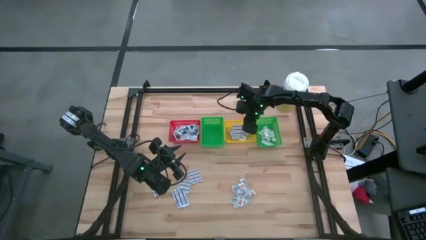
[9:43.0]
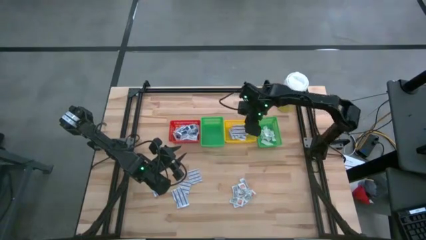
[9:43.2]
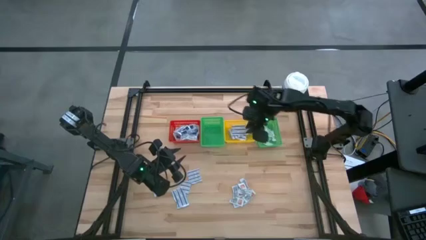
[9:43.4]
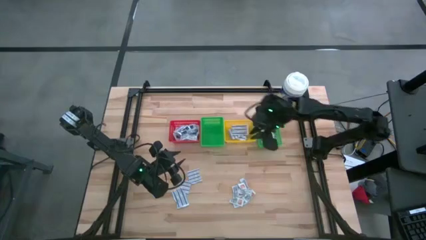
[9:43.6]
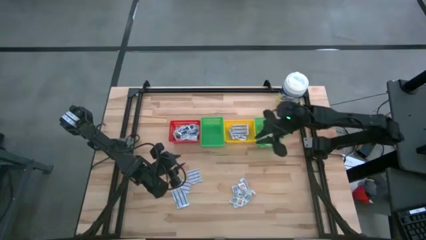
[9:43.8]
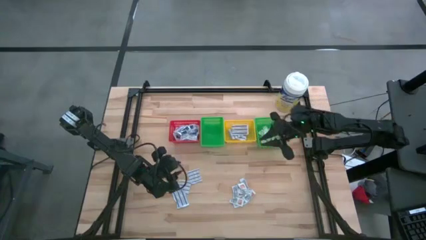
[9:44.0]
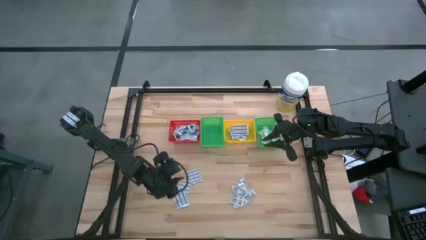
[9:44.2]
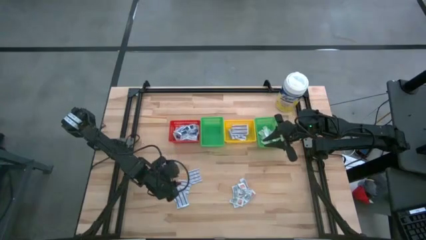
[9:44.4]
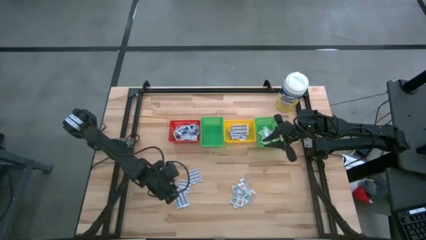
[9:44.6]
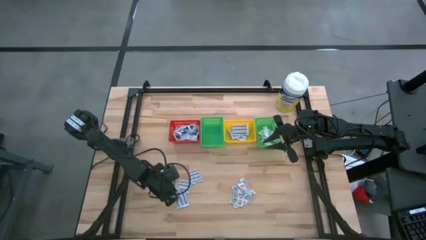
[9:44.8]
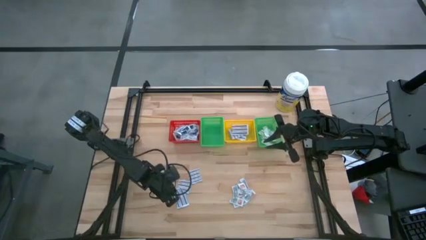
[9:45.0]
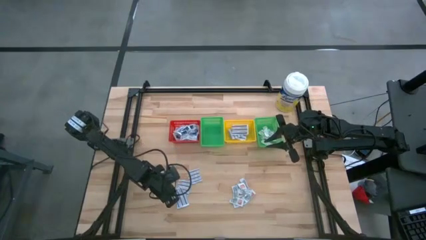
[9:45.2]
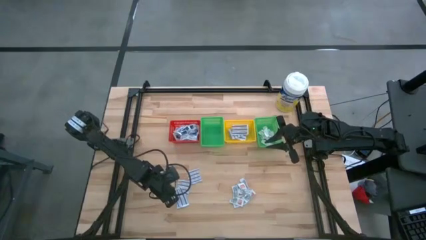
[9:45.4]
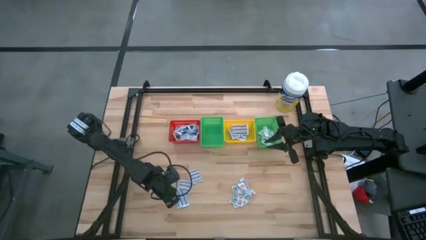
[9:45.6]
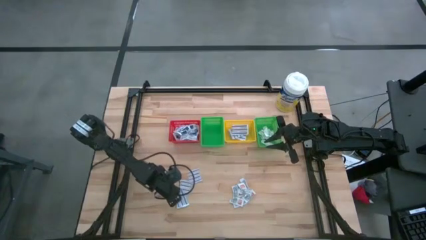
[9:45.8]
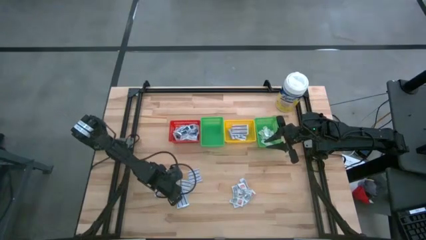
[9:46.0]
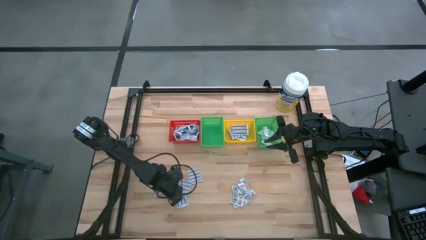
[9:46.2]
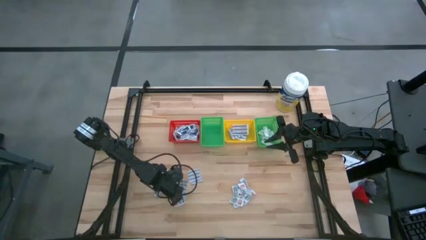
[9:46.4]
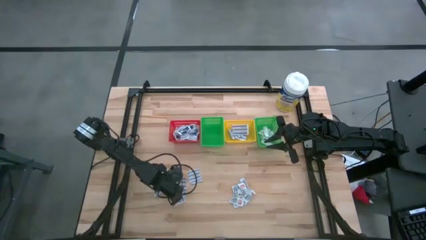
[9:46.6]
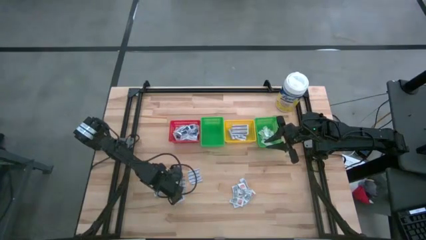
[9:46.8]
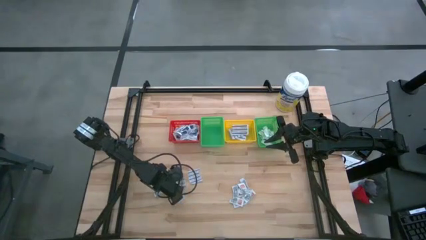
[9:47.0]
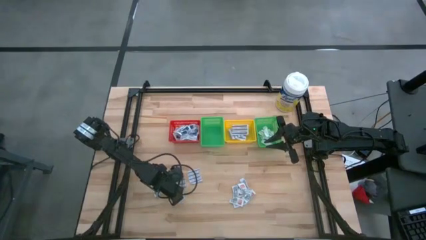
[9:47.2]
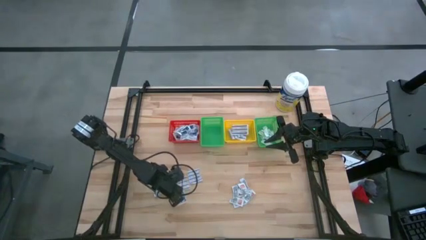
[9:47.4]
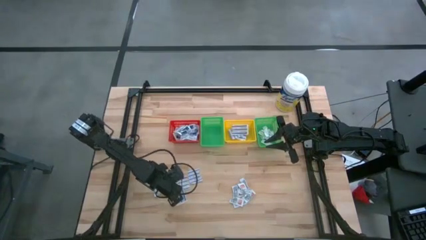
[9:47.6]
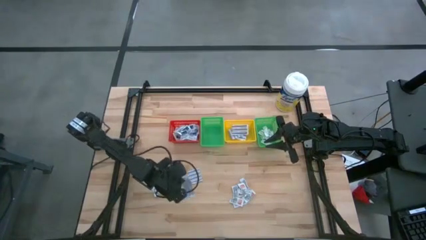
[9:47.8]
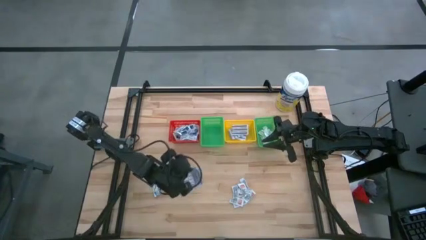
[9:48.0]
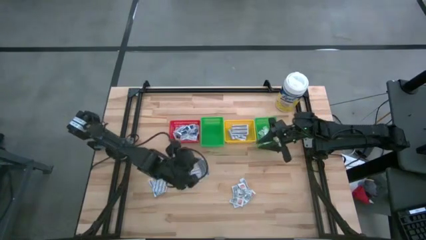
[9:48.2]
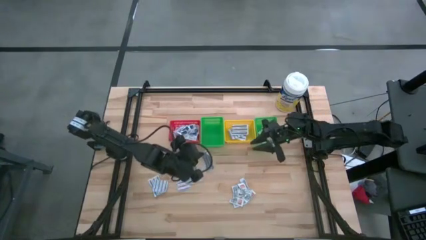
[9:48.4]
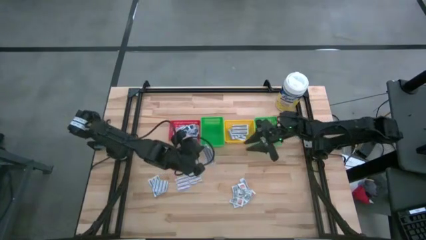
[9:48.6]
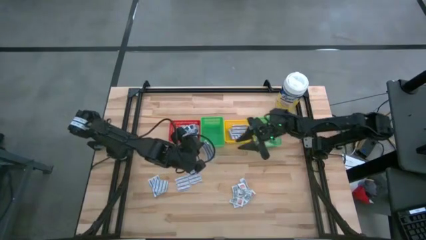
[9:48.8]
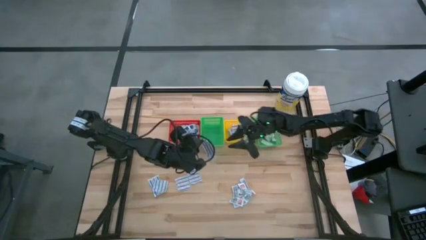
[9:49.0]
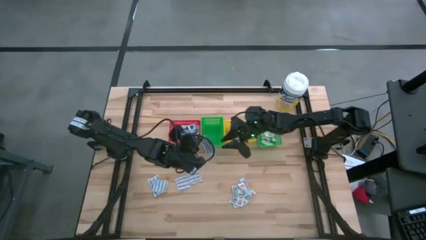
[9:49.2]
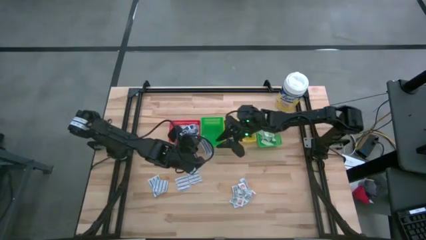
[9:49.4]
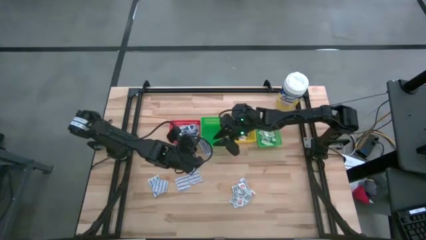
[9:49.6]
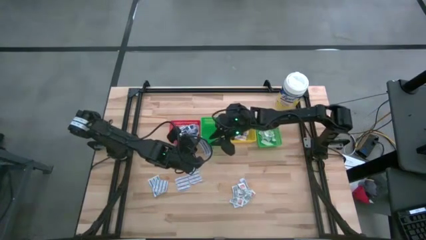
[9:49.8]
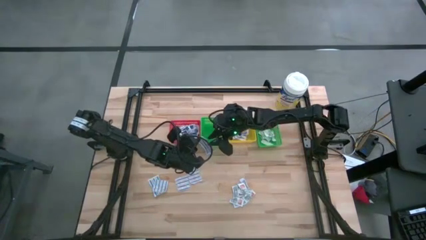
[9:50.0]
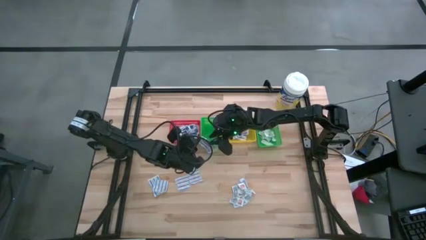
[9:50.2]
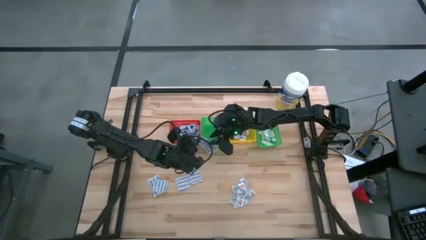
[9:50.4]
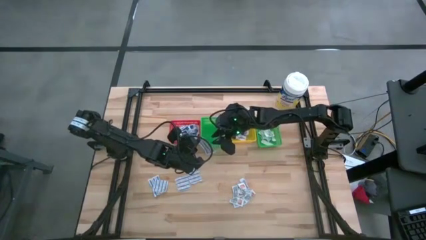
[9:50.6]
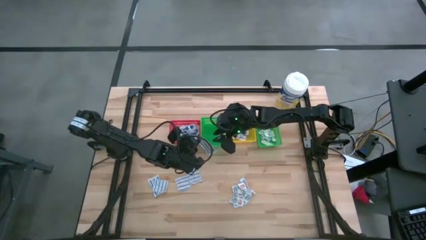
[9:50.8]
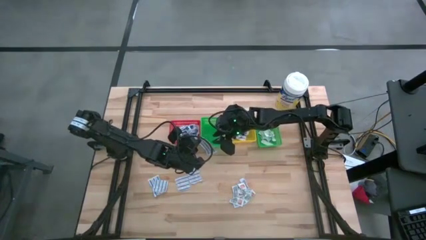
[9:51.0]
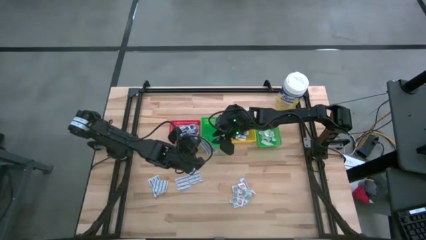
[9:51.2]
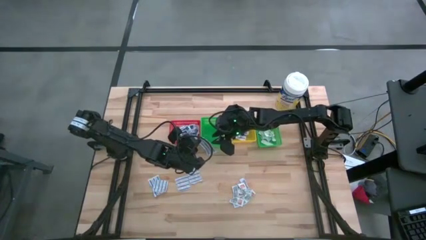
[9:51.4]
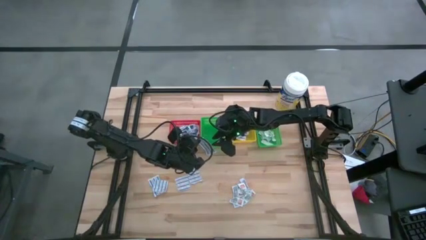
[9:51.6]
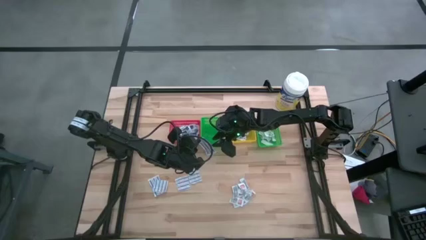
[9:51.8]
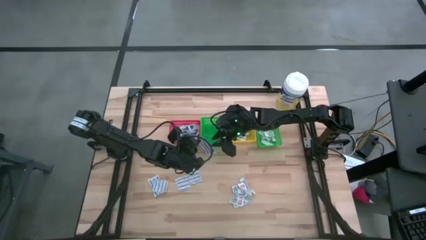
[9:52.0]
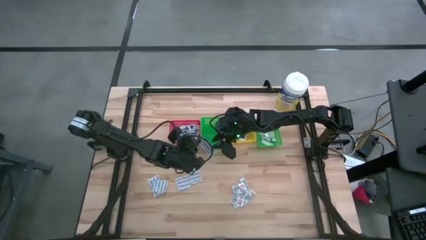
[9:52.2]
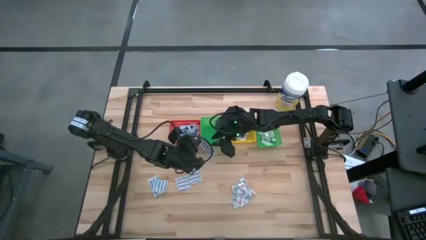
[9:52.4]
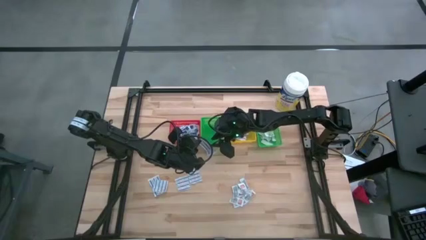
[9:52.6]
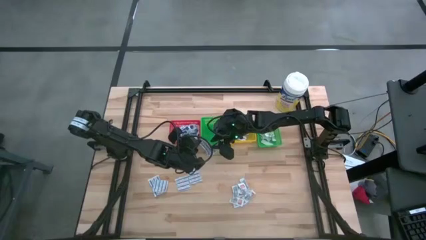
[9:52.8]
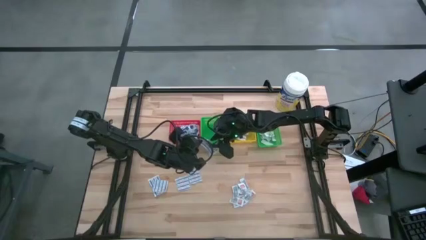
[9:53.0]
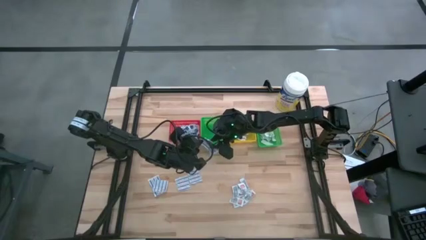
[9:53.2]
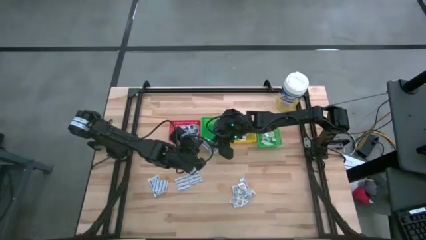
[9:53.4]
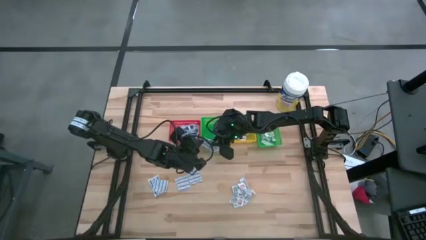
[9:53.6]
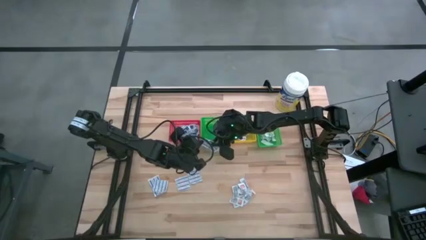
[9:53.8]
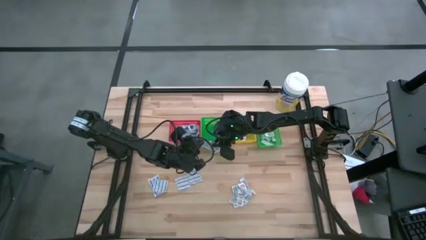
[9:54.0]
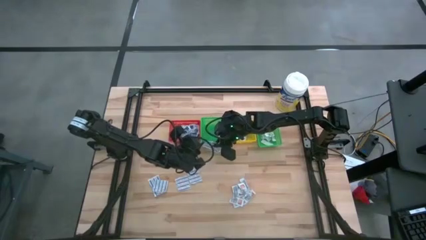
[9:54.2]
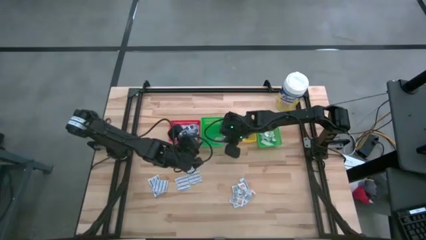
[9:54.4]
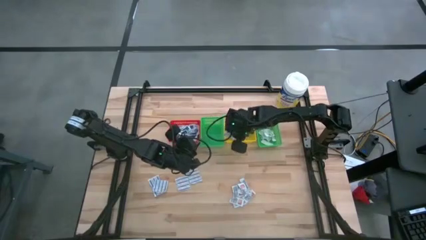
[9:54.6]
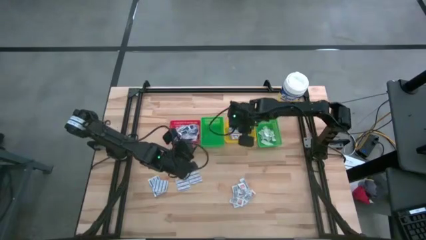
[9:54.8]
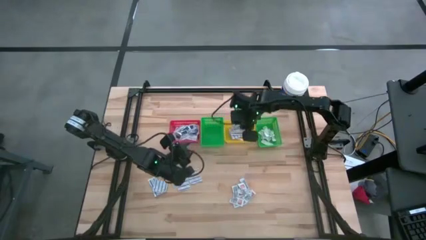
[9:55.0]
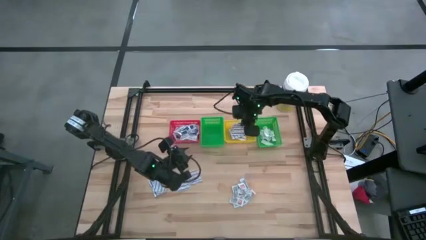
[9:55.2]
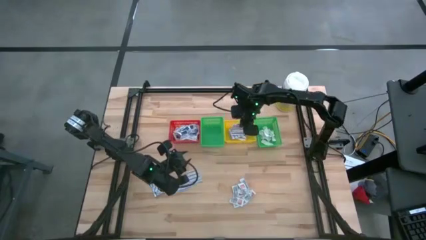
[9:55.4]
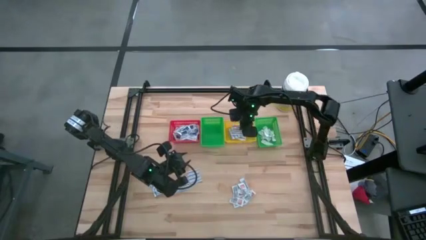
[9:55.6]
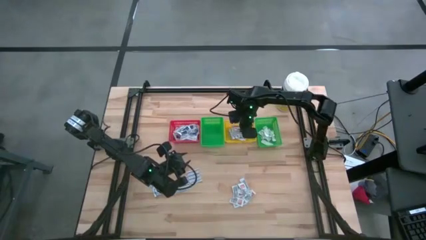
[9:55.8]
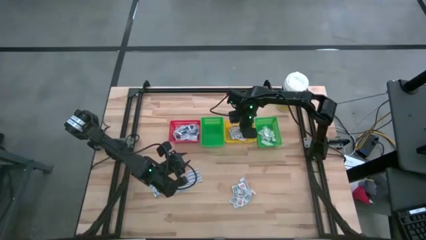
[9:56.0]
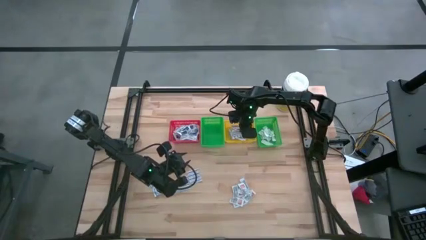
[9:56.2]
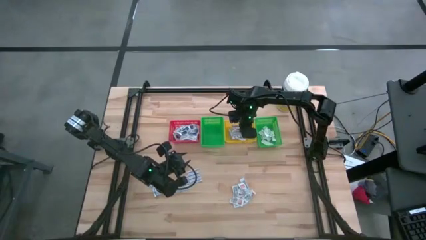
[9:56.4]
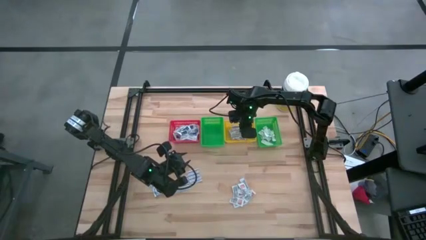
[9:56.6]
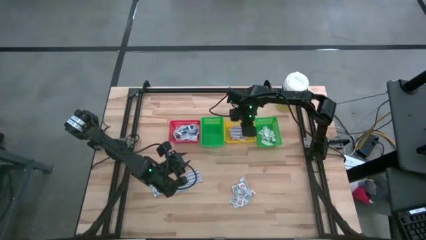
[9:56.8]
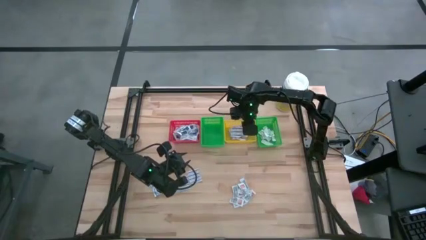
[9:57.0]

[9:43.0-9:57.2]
Task: Pick & Place First Aid Supplies
Put the blue bandage into the yellow basket
